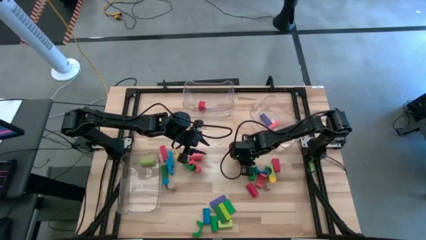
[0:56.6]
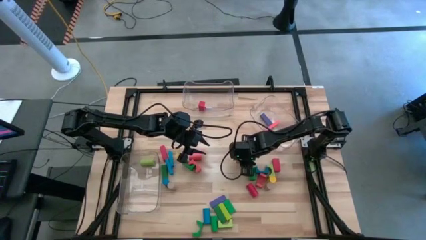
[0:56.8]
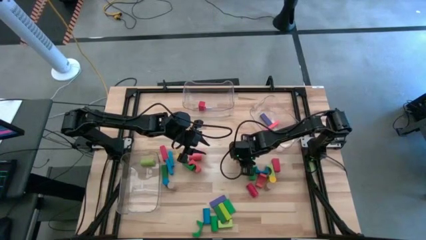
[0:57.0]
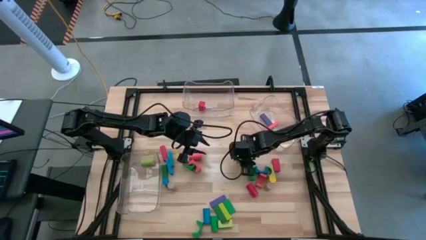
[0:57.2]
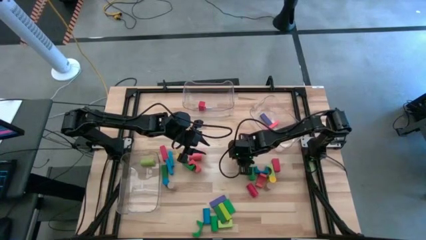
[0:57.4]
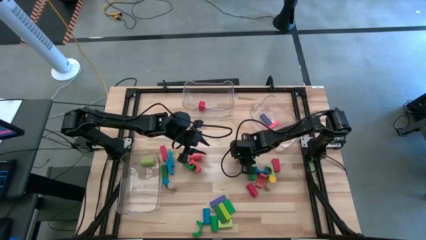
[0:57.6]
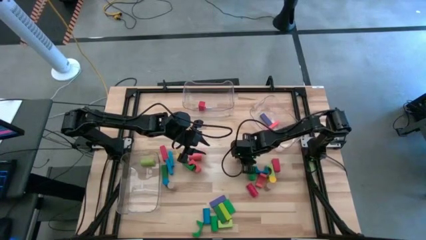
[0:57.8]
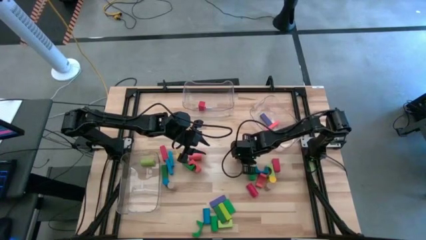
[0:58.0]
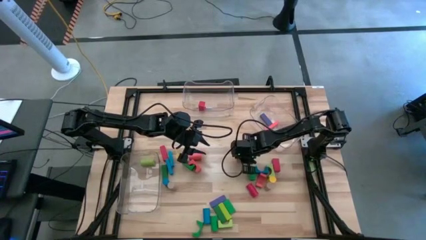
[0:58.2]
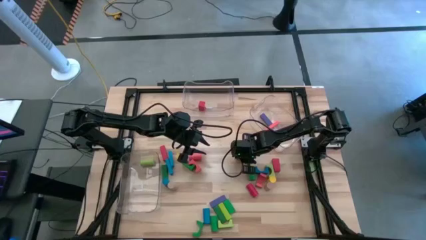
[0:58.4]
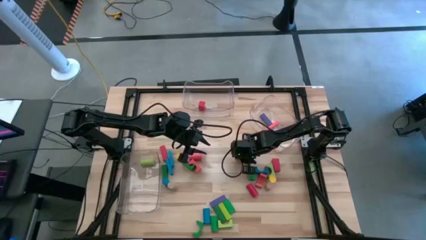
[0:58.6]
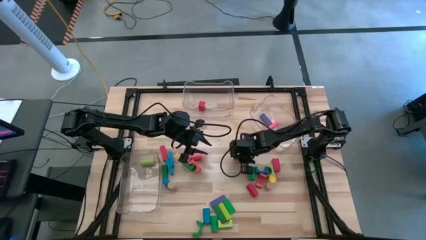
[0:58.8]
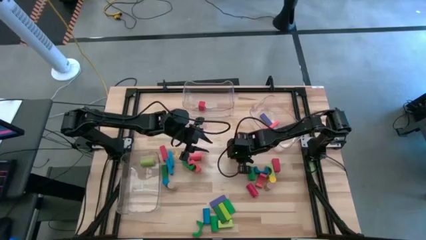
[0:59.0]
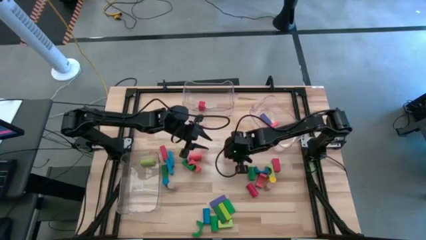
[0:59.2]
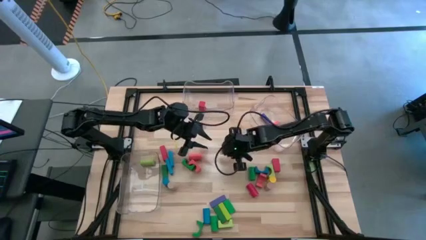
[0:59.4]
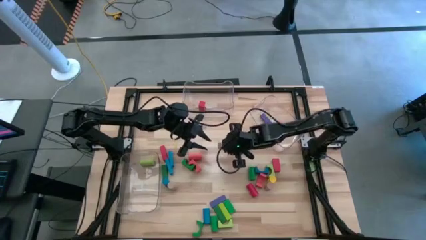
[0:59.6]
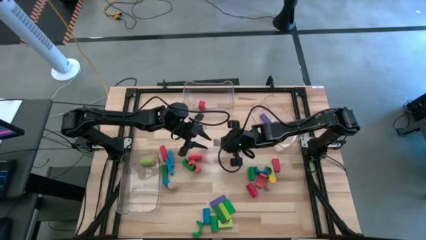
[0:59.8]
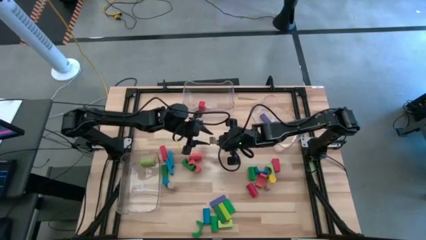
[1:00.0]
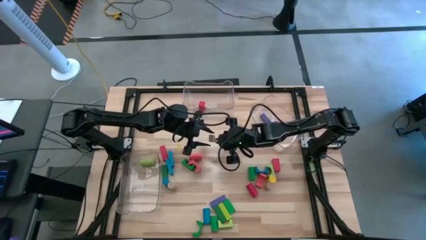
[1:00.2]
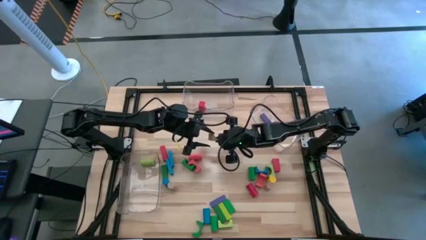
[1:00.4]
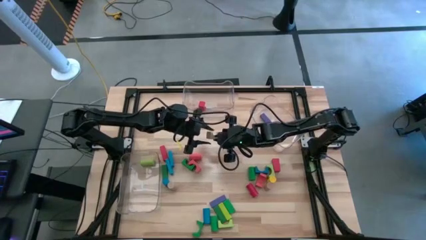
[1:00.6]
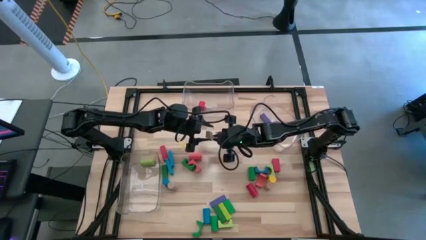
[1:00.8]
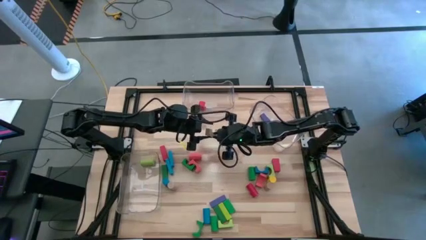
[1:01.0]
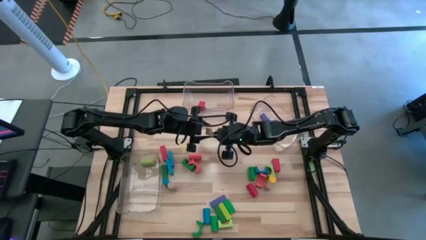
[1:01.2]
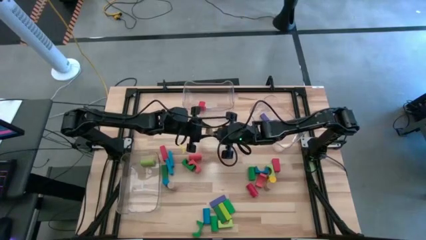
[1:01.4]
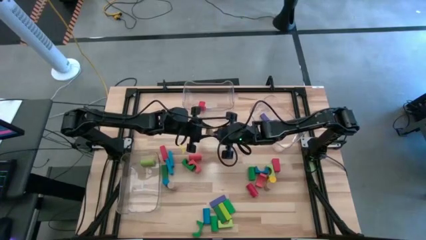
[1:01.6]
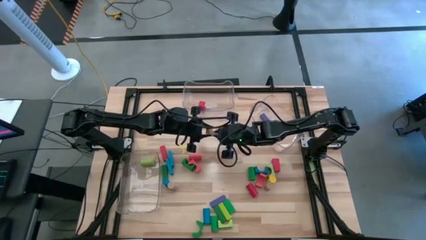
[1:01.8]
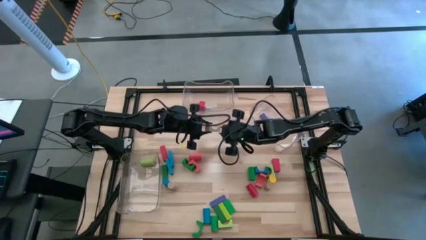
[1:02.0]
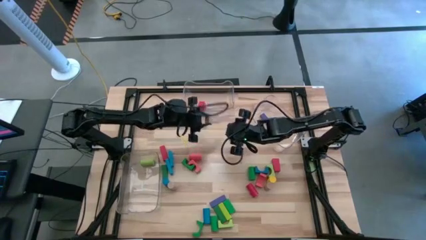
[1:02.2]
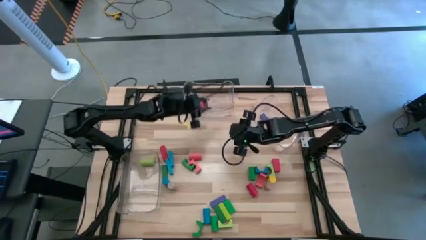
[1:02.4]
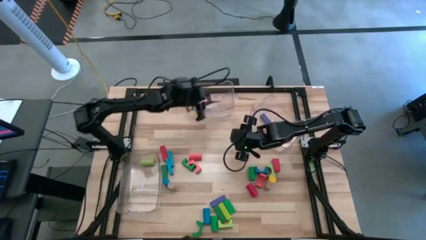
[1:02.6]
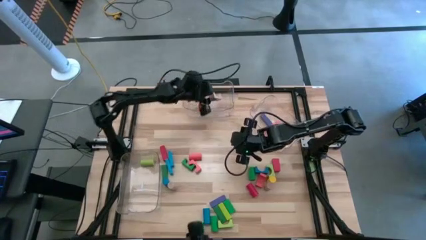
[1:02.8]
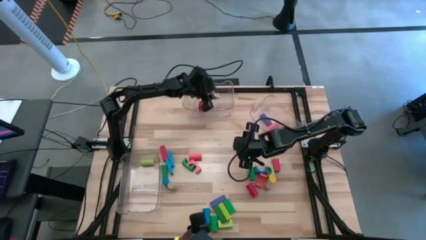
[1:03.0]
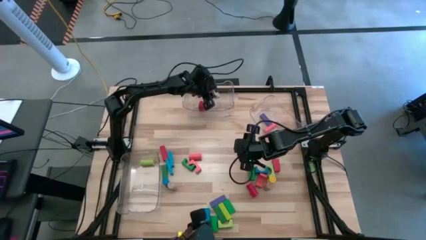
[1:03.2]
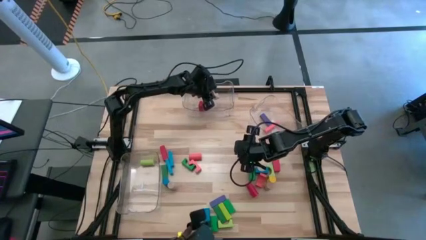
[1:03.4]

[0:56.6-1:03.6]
Task: Sort blocks by size
Put the brown arch block into the middle transparent bin

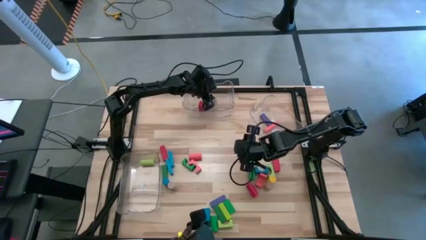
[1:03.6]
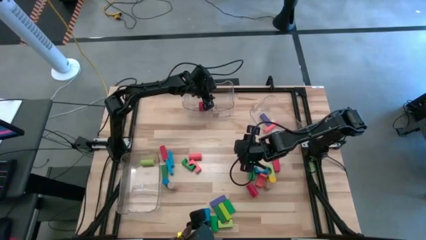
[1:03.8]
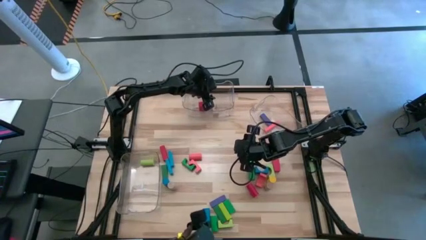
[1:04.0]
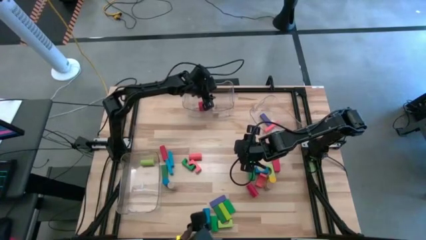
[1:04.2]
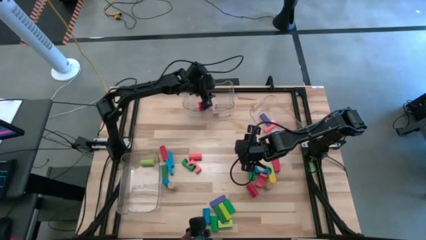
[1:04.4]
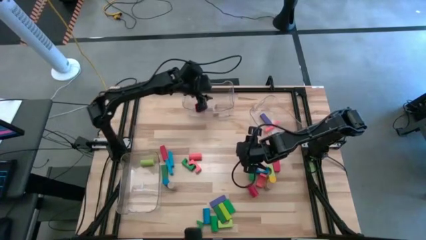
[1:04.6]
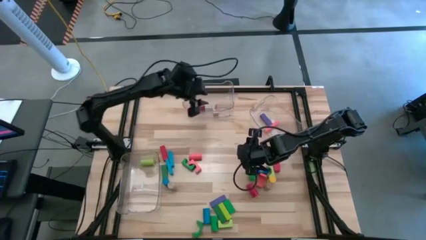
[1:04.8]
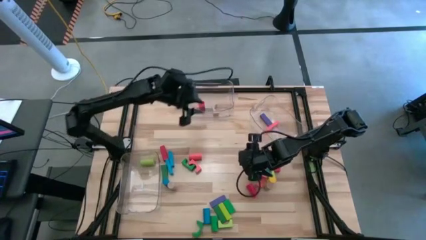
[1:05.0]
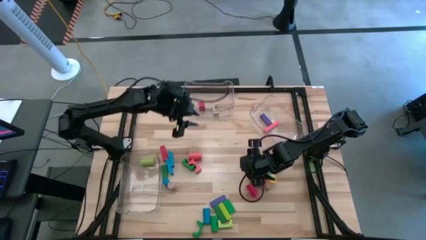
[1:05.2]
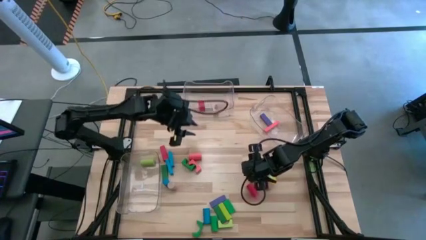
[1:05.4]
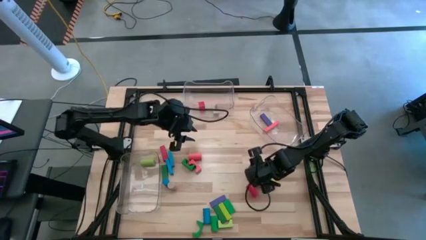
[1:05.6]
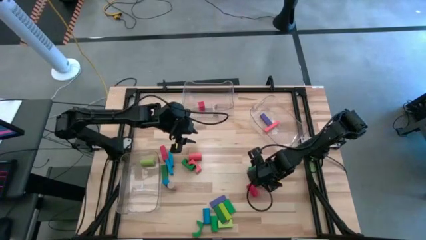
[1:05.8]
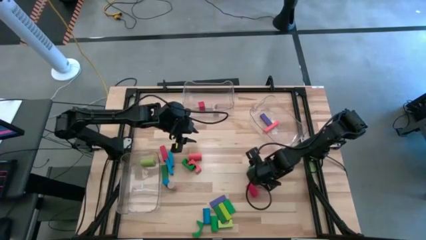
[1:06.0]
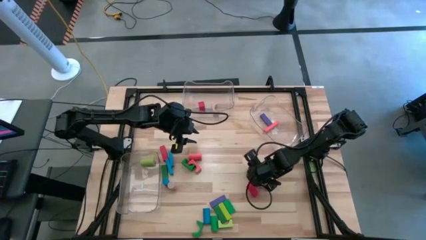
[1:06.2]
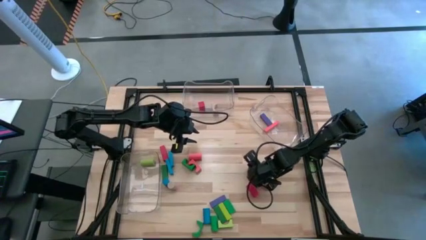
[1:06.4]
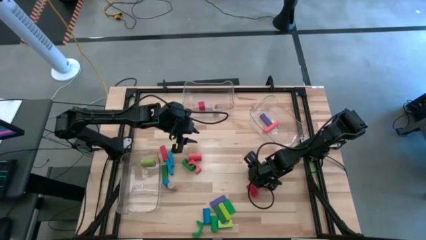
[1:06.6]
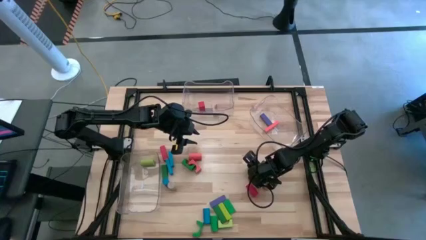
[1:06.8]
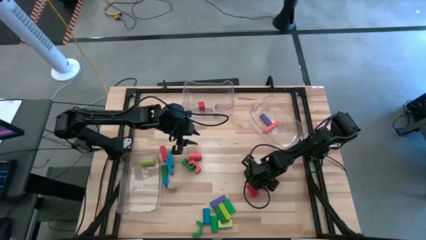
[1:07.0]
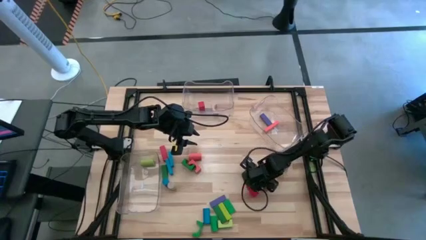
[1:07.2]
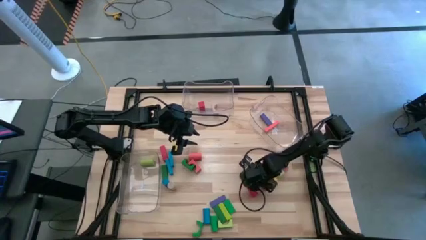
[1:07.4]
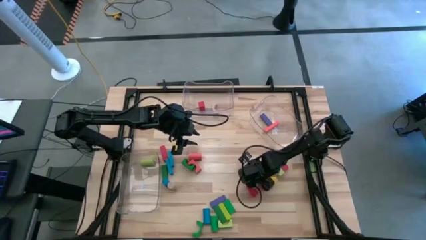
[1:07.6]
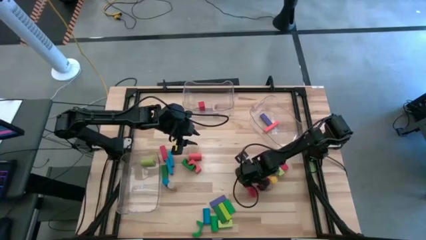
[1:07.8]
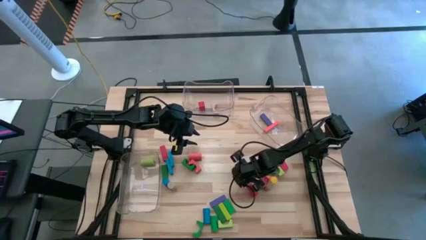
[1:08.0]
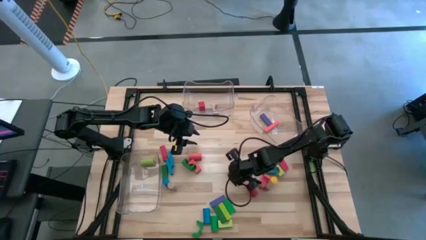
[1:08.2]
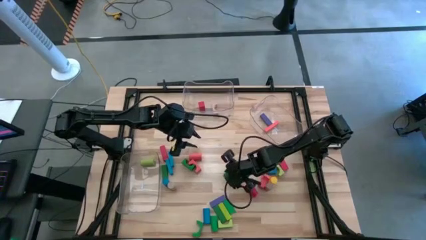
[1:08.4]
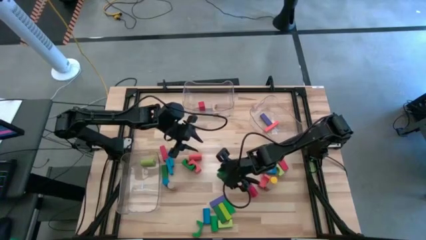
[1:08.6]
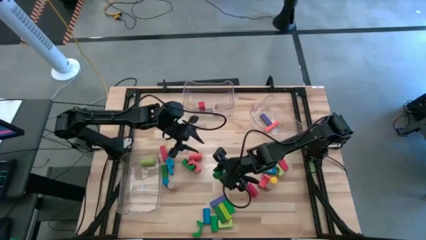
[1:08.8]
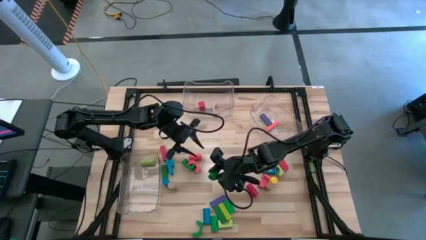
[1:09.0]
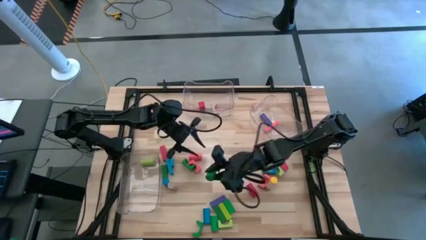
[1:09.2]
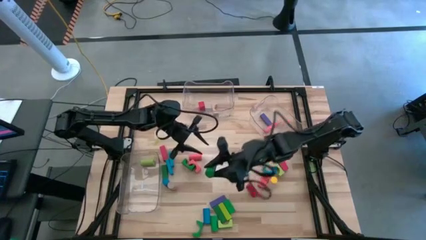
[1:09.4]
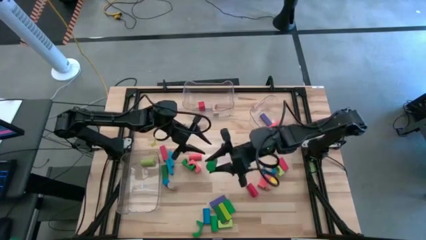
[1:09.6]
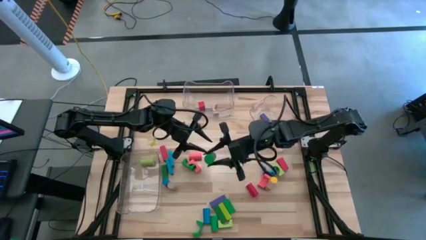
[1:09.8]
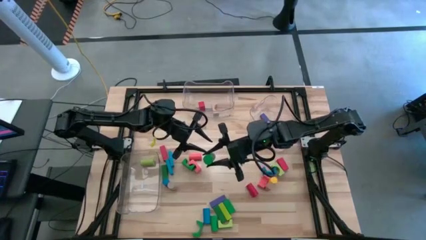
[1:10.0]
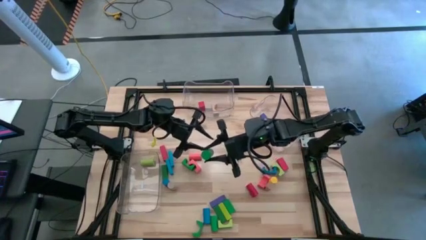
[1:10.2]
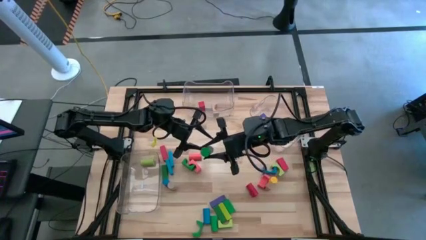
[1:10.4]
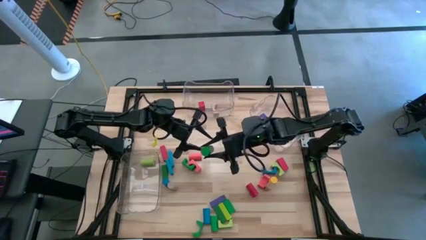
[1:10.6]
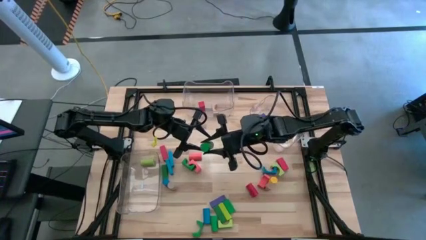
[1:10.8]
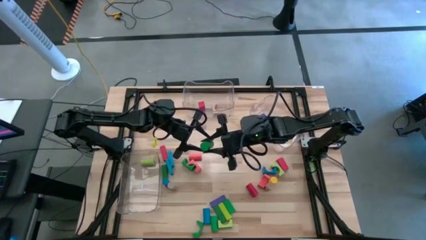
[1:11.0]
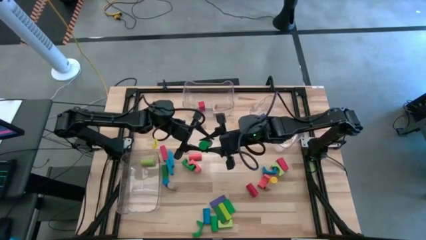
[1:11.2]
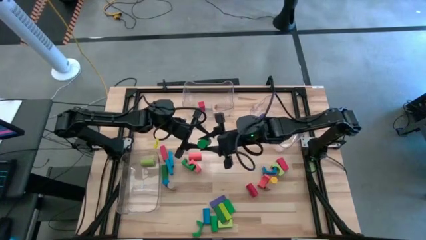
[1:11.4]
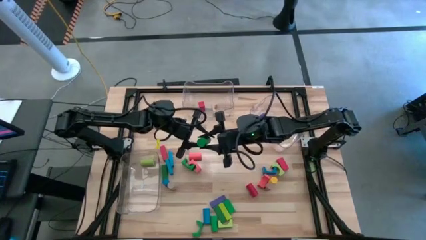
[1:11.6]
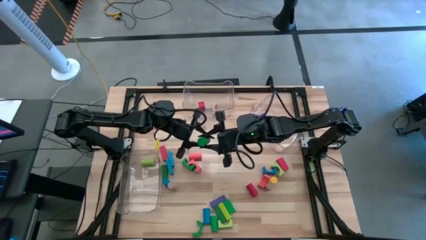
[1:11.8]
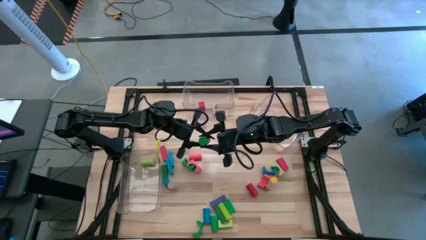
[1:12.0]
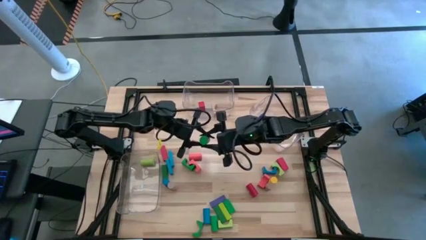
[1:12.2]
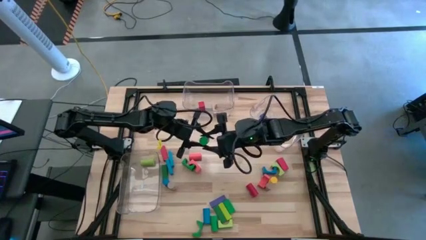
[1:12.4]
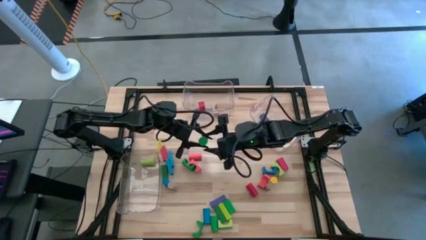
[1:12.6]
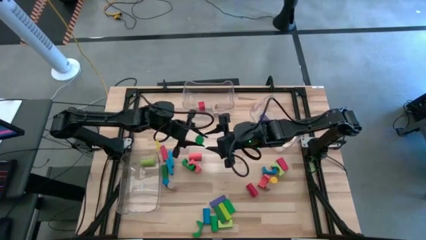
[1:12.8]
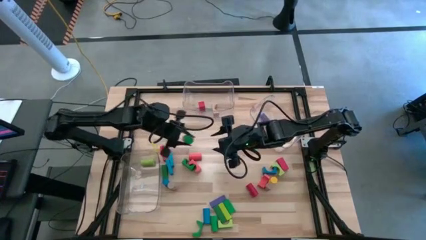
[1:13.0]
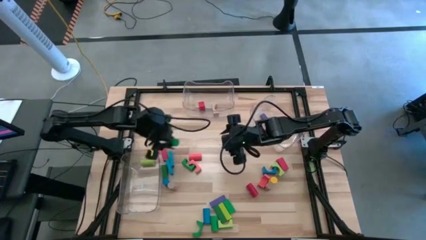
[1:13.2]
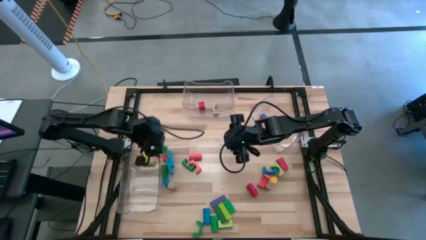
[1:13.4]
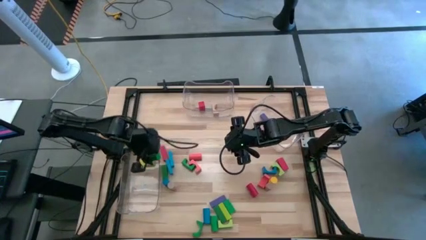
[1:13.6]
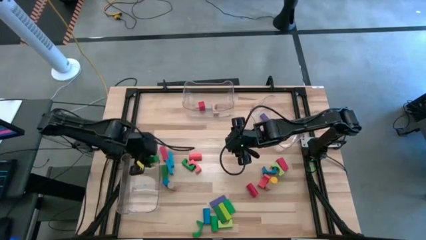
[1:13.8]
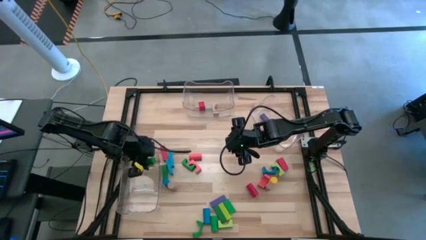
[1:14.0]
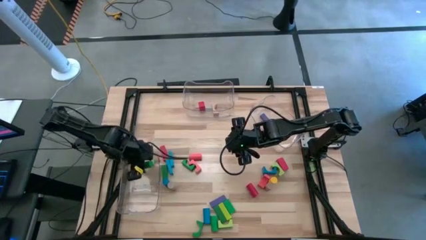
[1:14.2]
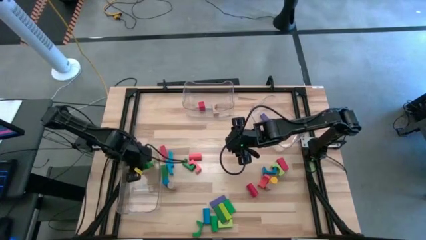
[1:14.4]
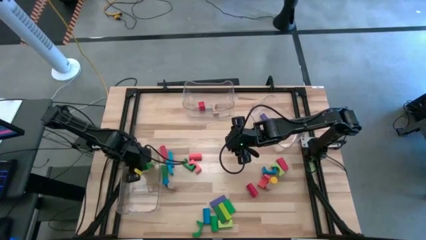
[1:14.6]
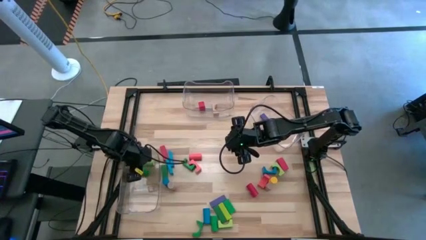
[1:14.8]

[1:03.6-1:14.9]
Put the green cylindrical block into the left transparent bin
